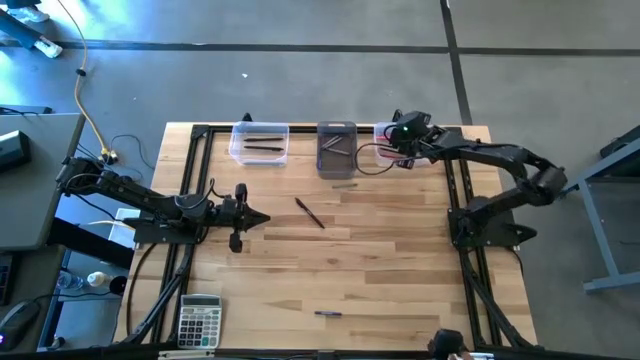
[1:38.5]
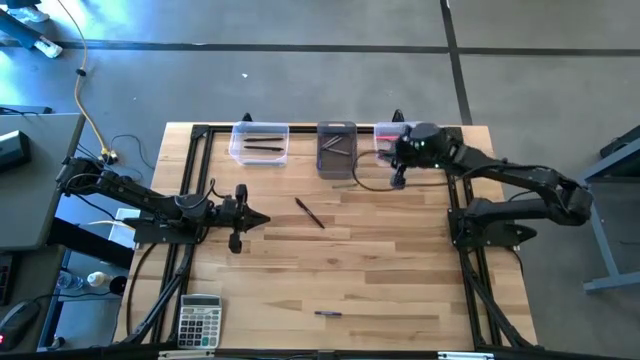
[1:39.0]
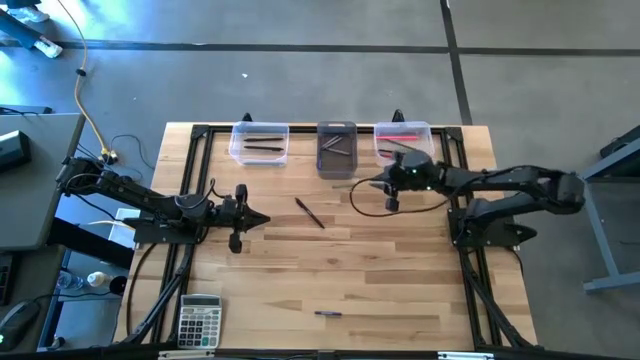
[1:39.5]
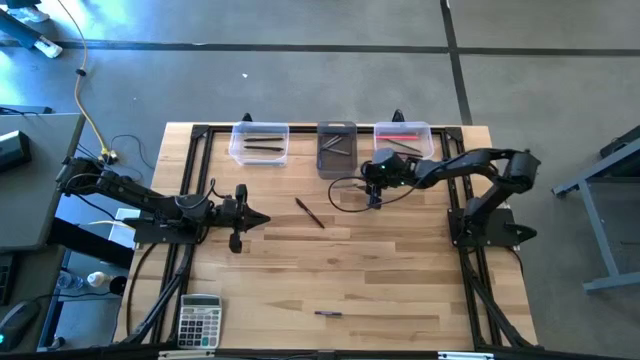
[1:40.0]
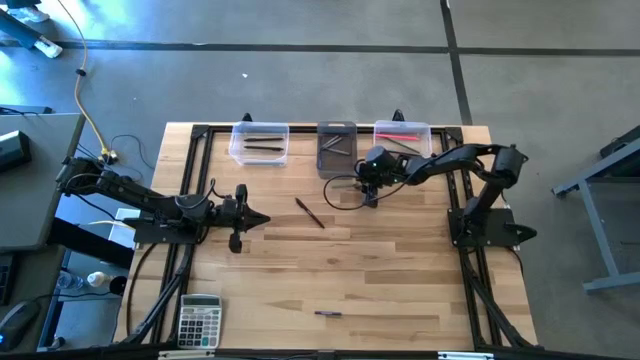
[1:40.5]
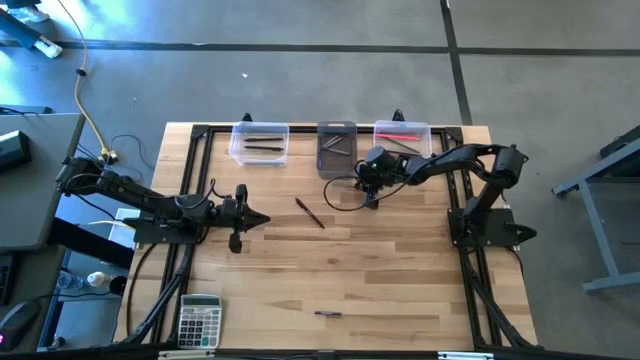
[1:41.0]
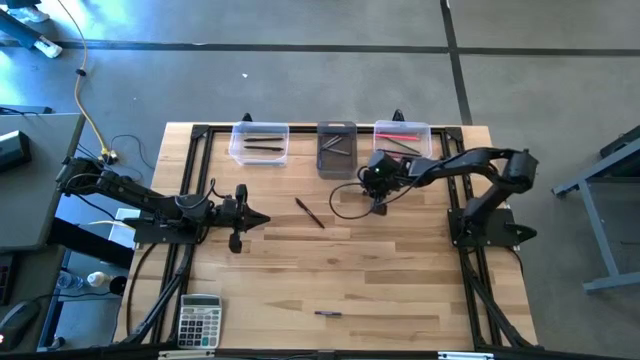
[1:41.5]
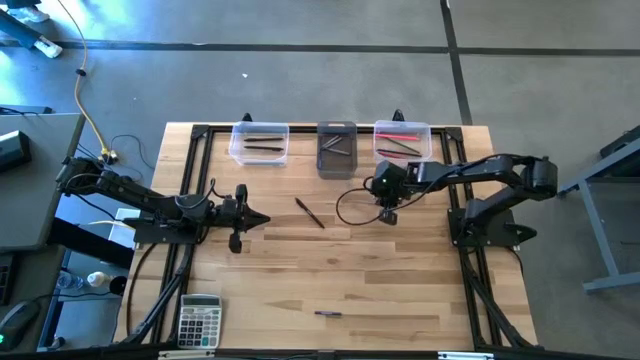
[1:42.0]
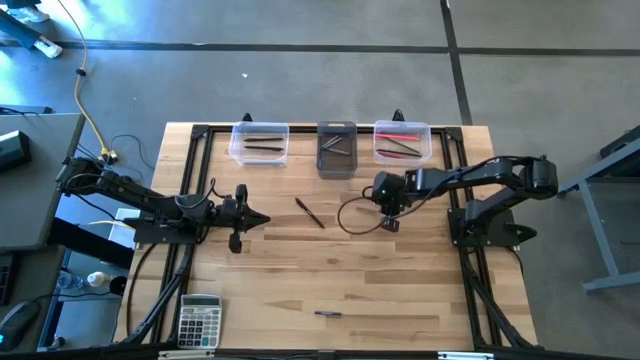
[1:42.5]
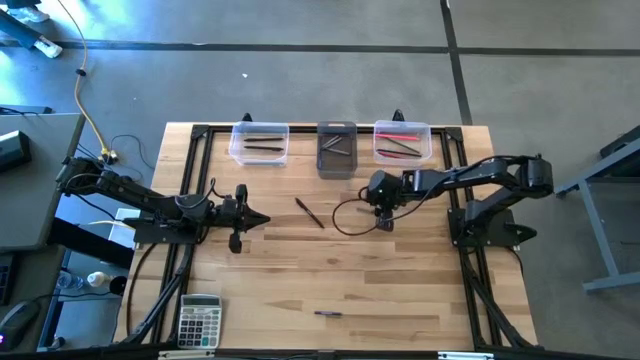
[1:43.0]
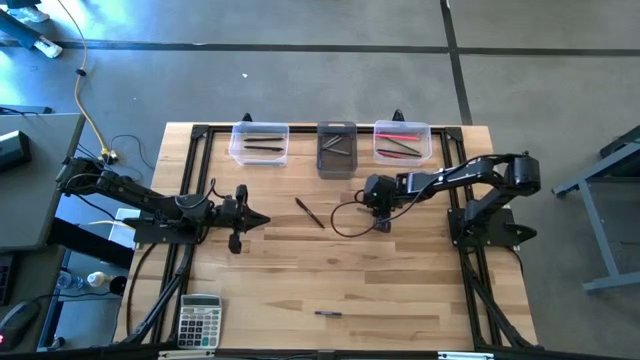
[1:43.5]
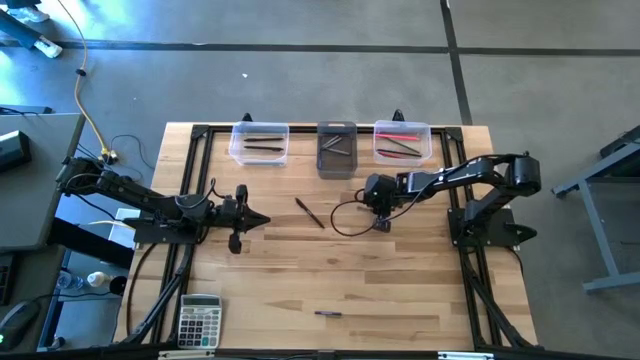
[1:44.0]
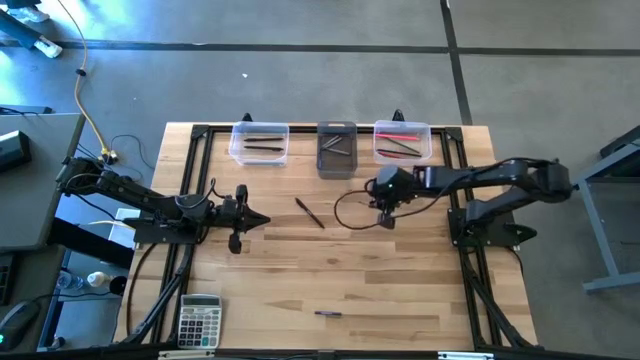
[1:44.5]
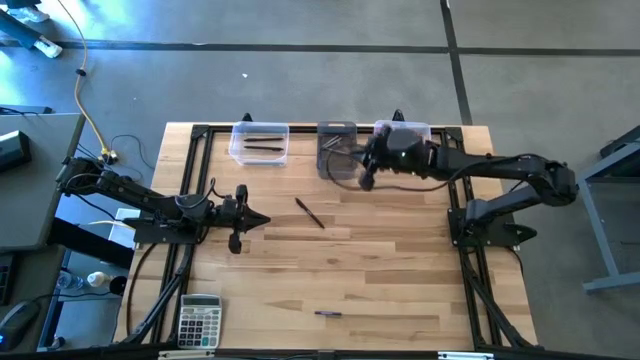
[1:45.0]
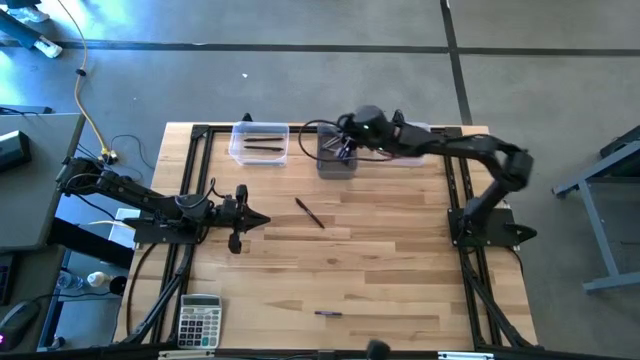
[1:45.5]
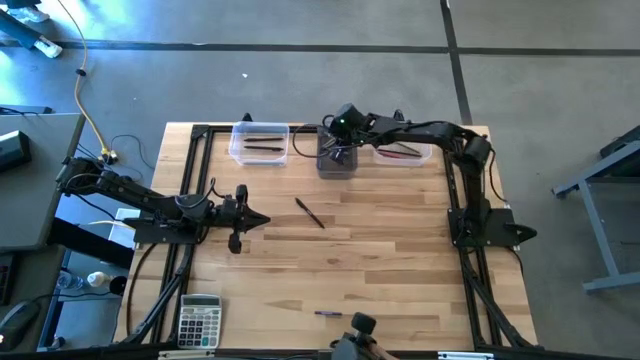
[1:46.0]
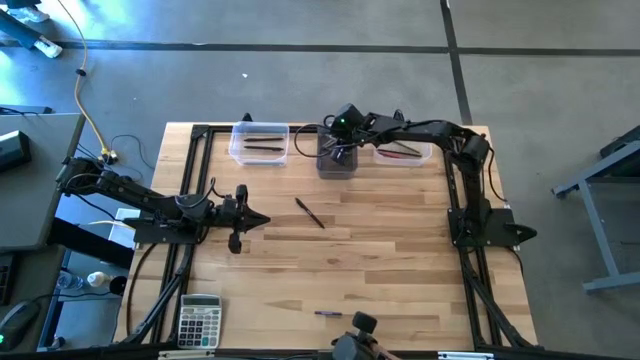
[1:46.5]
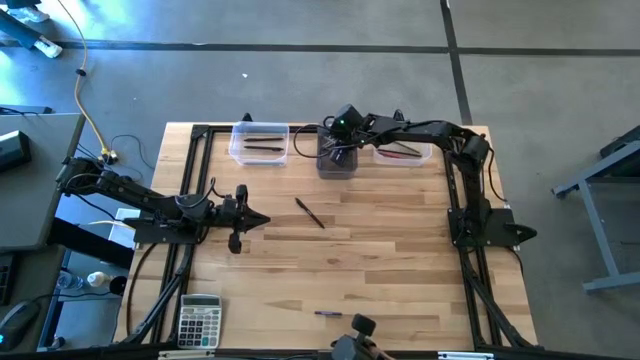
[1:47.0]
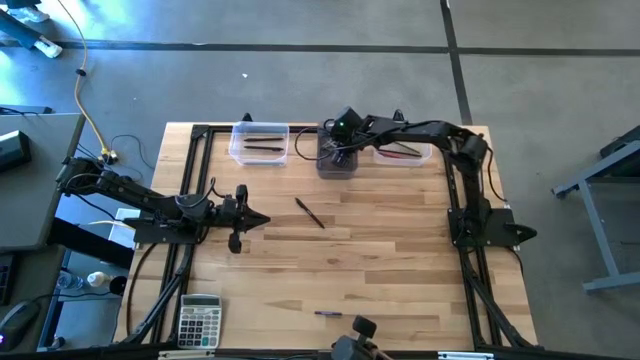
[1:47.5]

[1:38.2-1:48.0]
Task: Sort crayons/erasers/pens/pencils in bins
Put the gray crayon into the black bin

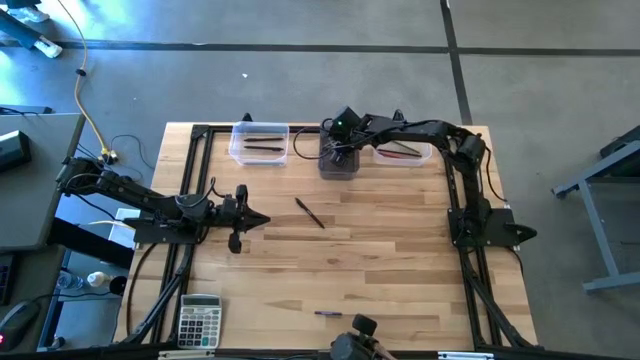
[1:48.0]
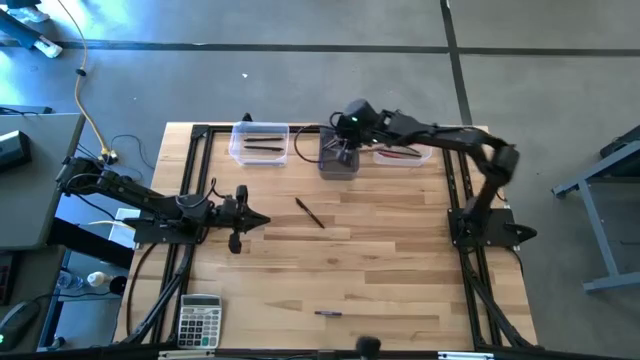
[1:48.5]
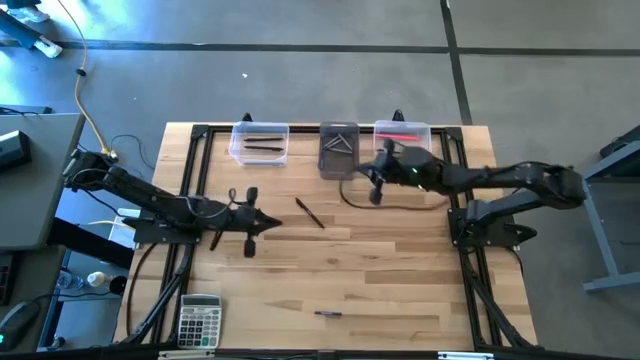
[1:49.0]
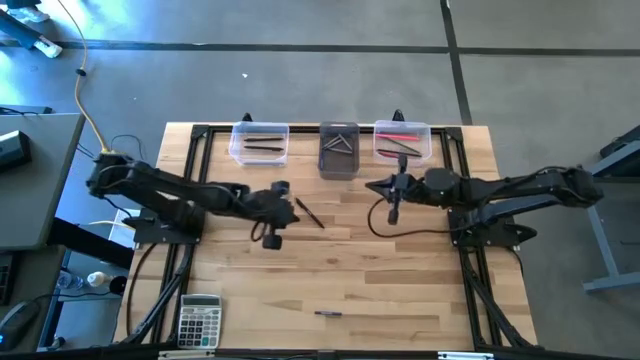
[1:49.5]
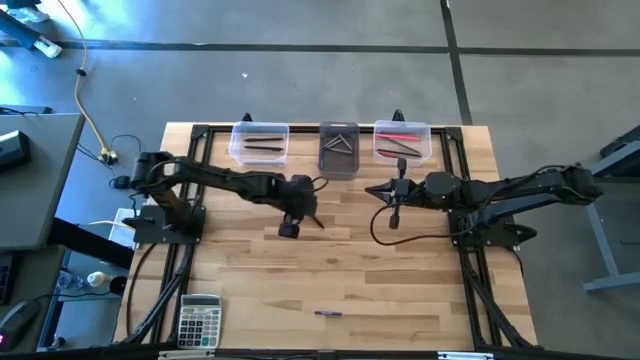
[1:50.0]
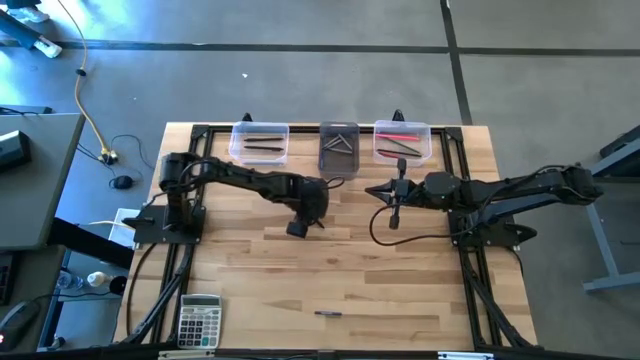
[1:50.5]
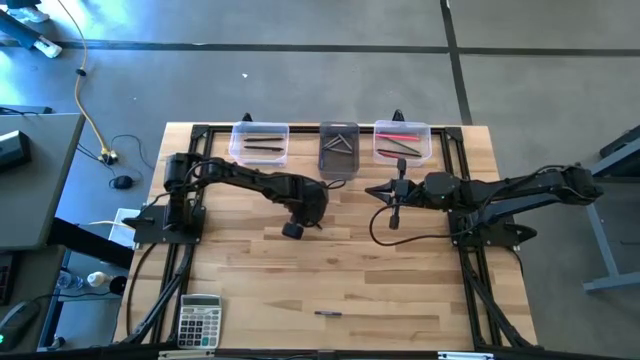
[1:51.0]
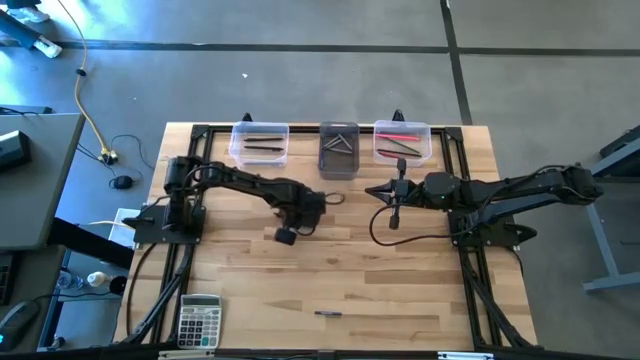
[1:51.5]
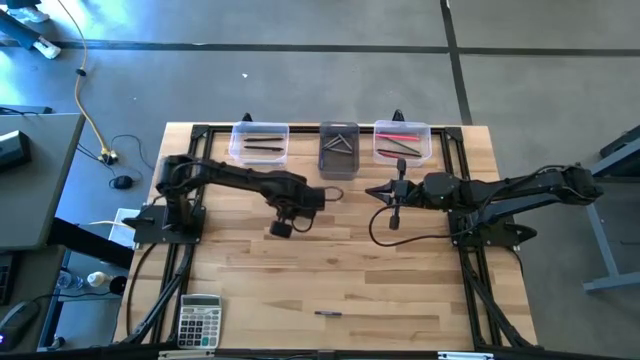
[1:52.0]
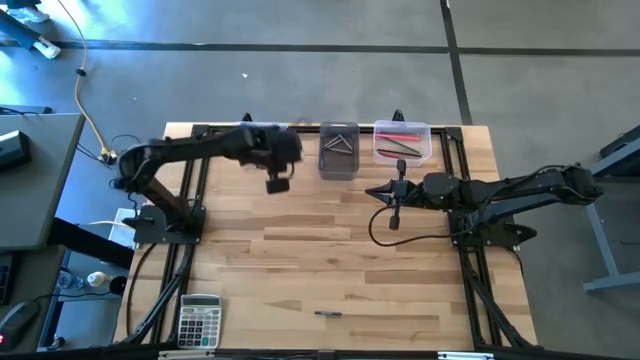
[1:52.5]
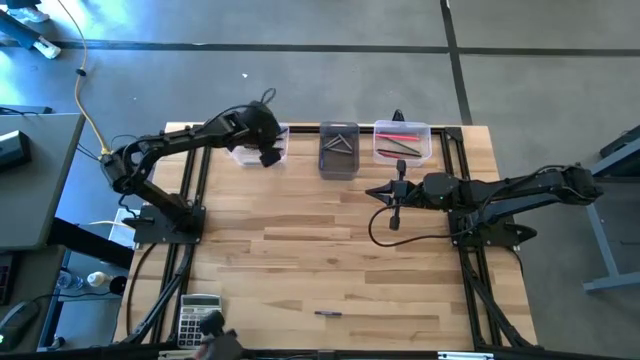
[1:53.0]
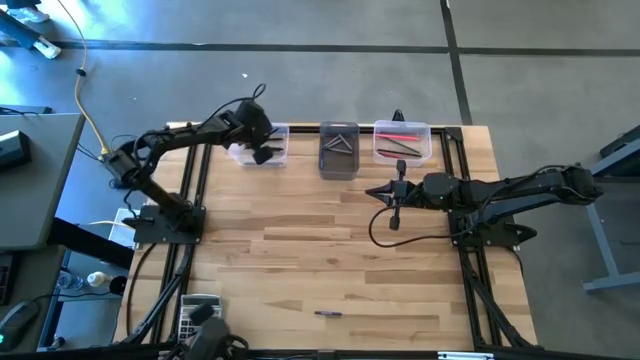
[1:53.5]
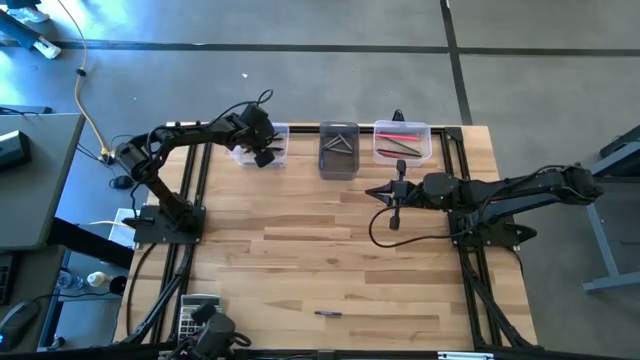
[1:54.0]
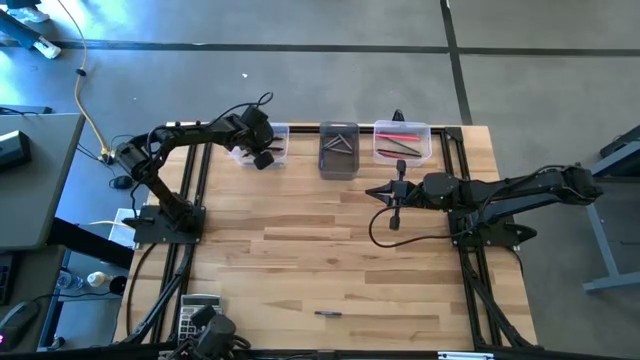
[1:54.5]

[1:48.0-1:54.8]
Put the black pen into the left transparent bin

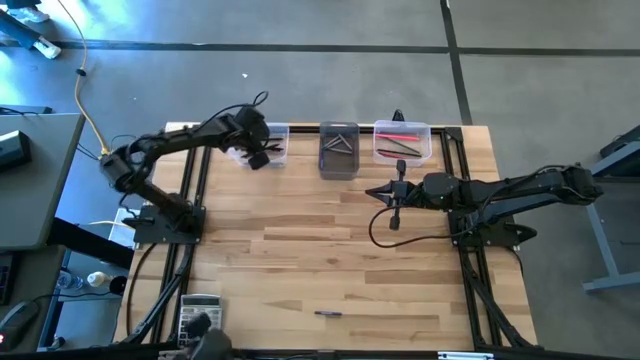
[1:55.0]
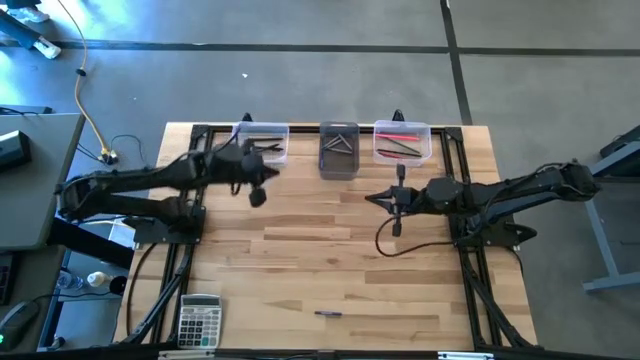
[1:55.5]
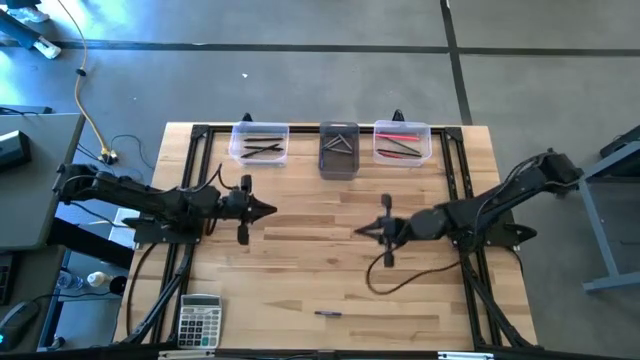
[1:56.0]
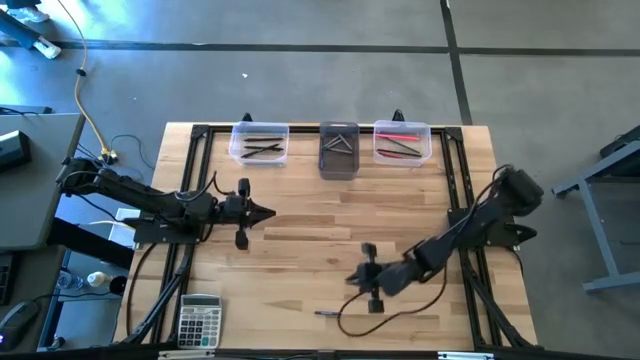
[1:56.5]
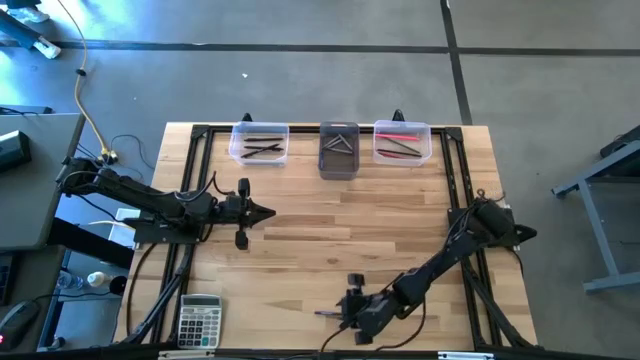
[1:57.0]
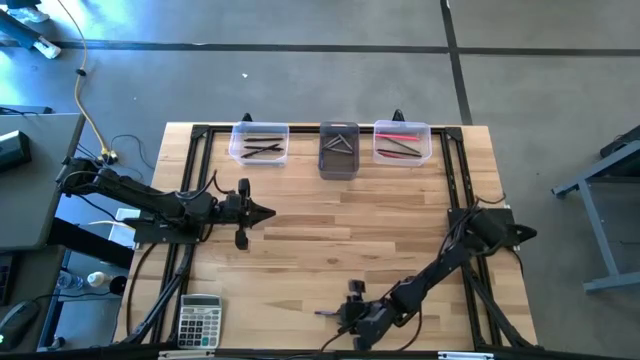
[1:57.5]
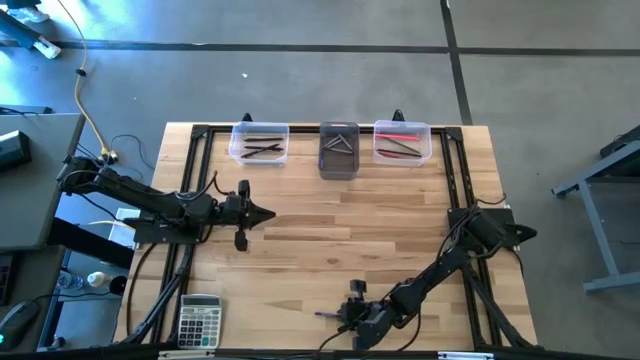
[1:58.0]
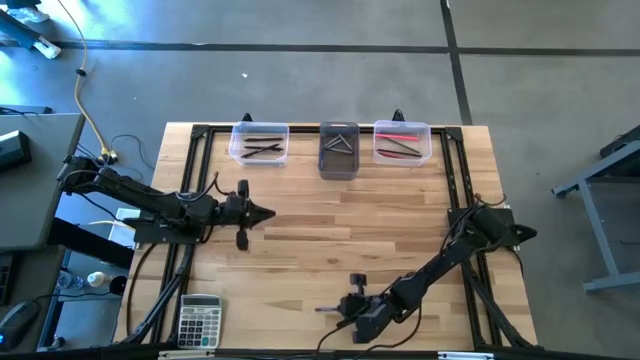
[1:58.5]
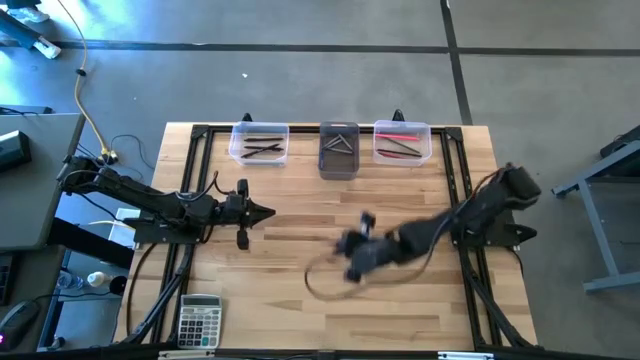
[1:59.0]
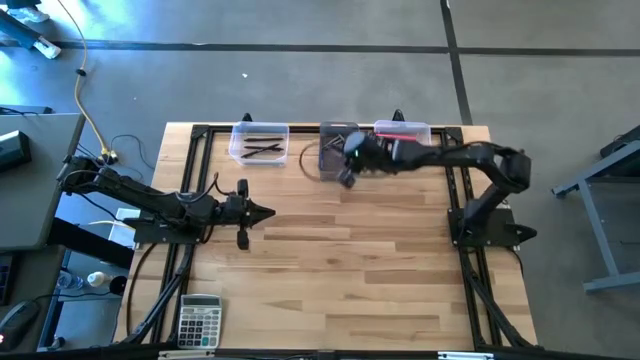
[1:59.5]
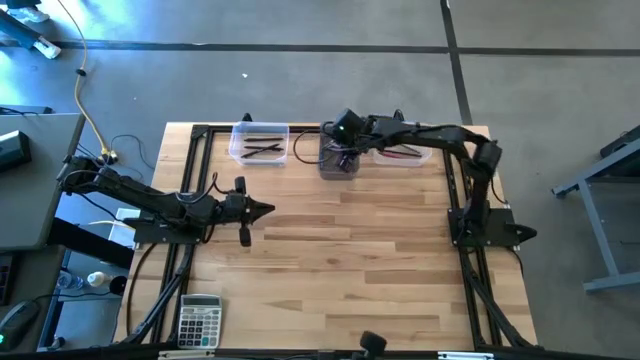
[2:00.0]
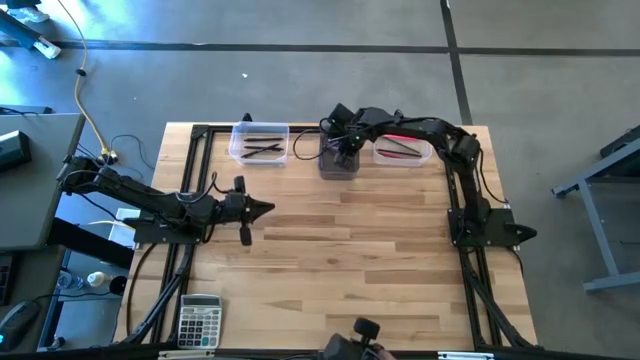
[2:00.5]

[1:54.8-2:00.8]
Put the blue crayon into the black bin
